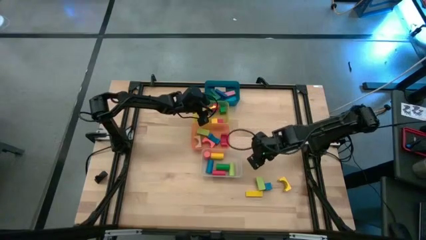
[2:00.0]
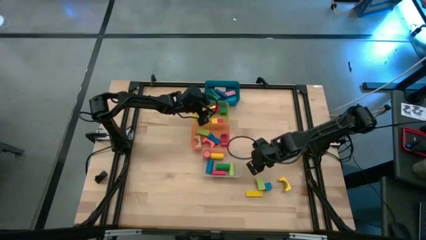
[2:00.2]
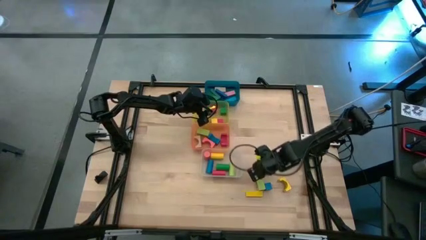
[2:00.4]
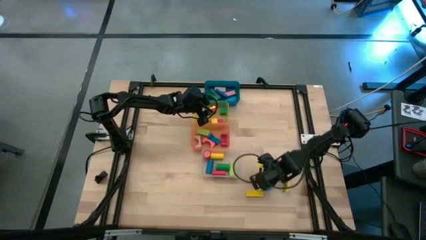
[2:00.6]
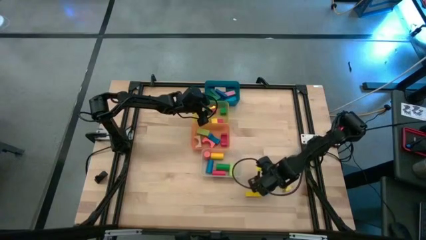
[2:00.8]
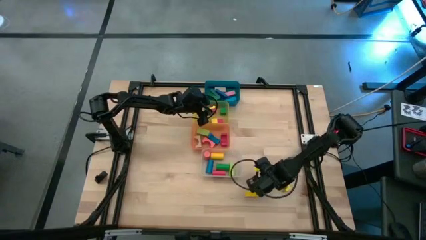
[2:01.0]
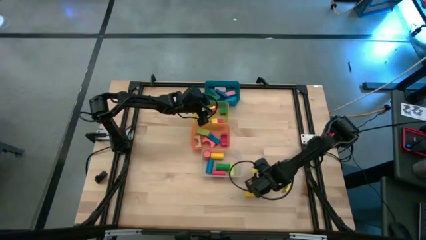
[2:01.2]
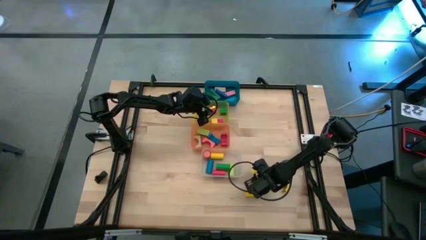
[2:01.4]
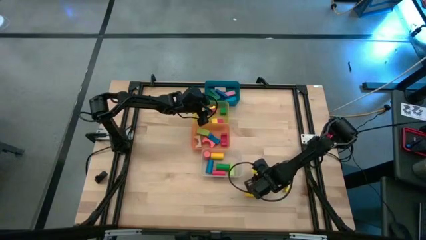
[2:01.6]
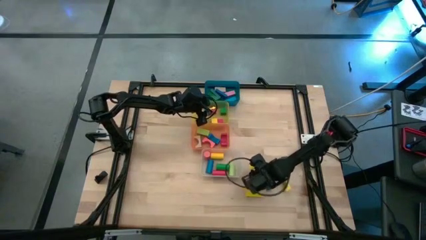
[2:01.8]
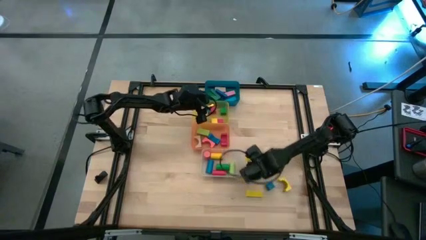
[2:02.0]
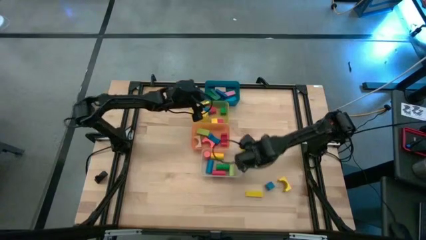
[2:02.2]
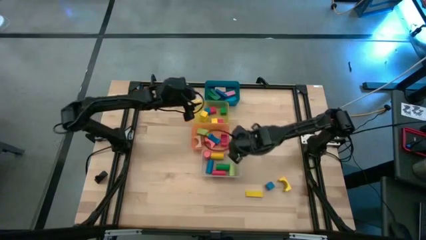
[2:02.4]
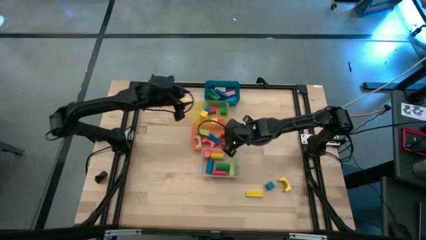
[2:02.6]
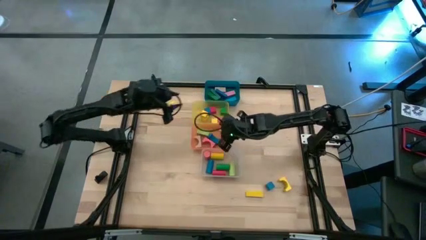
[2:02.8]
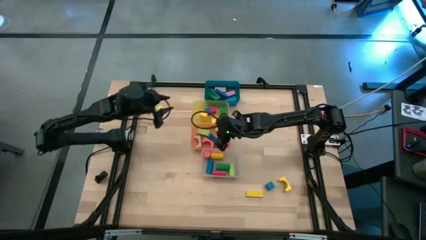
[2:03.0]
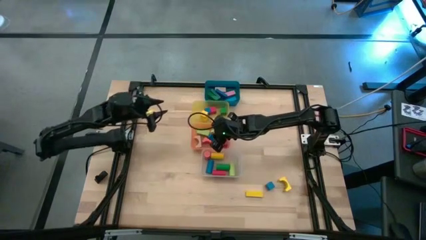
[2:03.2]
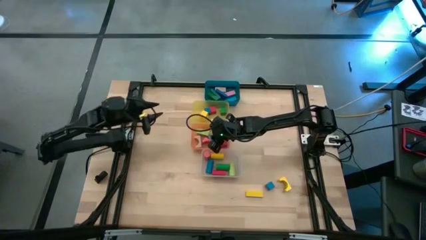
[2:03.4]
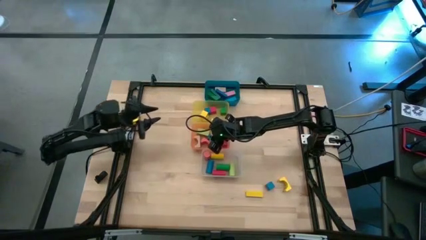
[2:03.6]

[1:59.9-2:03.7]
Task: Sort blocks by size
Put the light green arch block into the orange bin

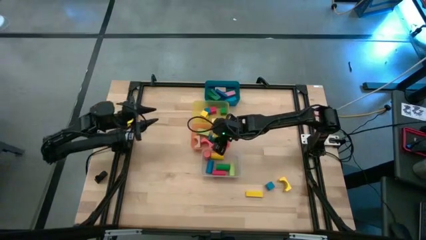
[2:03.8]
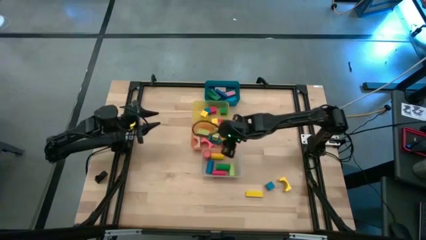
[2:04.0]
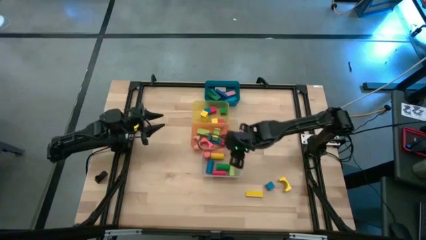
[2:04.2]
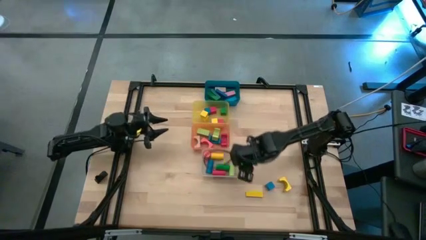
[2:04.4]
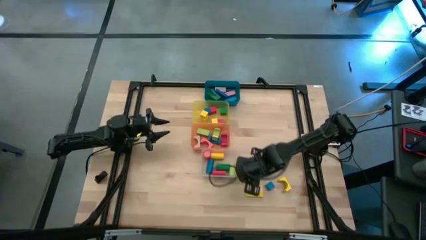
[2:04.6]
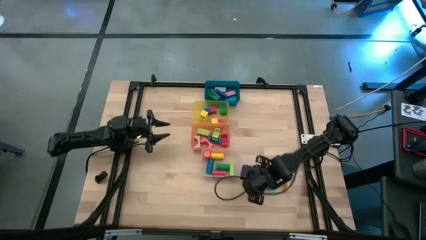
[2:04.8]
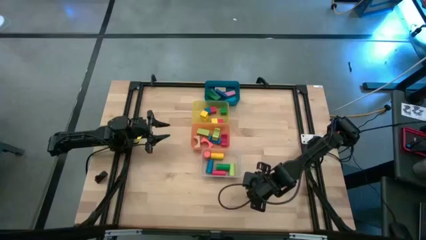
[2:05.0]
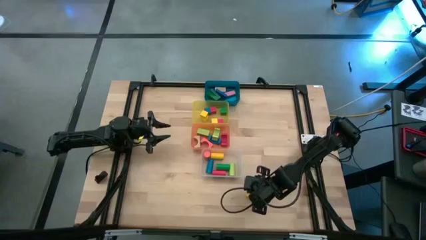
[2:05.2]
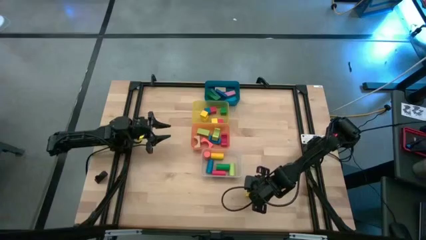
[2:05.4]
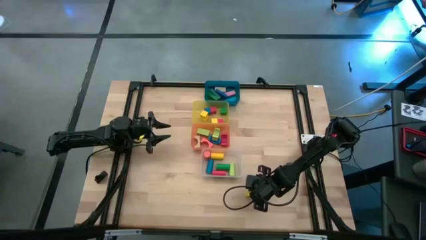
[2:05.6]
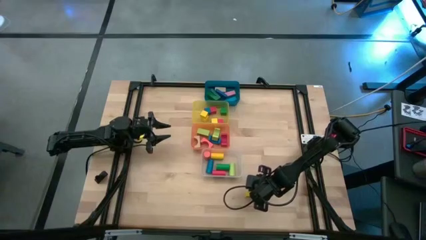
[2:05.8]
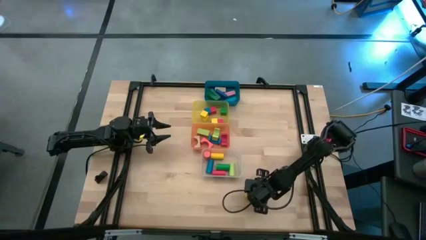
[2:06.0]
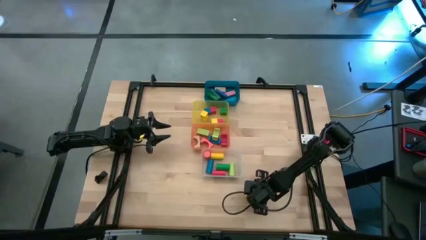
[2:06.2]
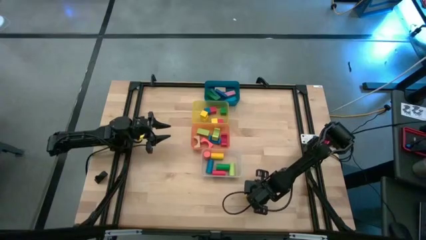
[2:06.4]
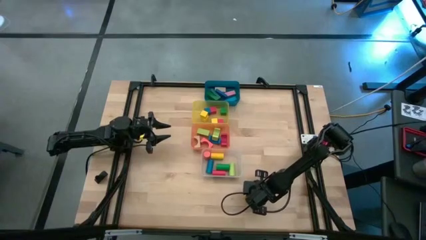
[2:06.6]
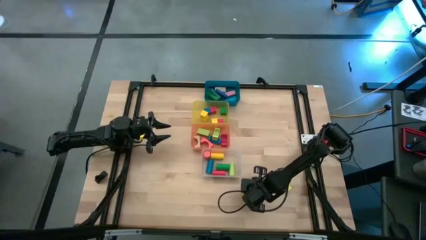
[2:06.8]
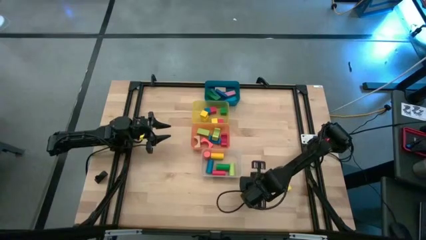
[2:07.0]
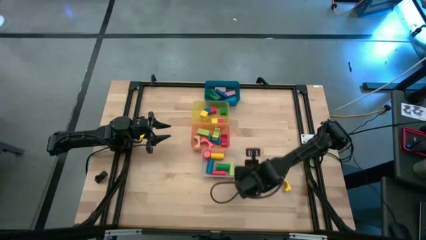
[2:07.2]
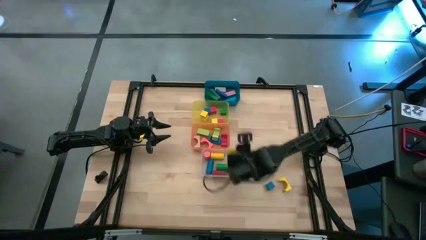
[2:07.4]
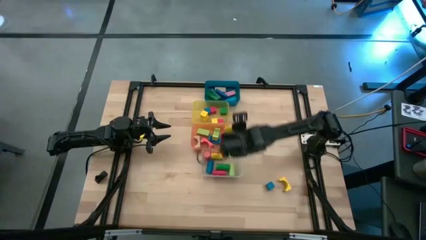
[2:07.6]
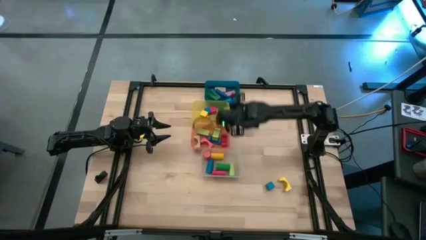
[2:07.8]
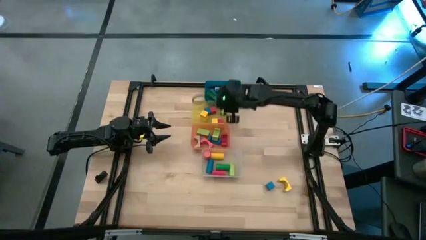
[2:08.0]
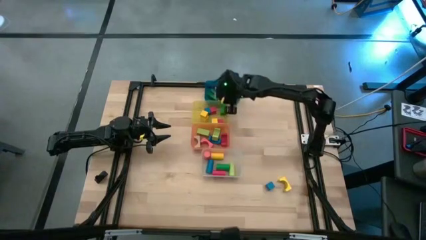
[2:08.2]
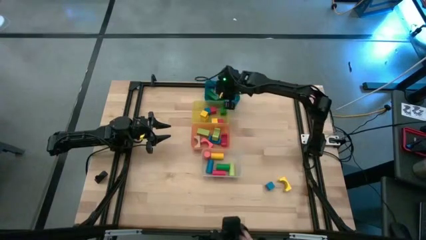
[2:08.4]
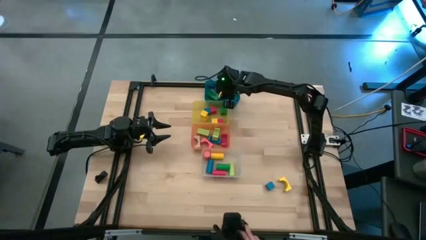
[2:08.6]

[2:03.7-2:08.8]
Put the yellow rectangular block into the blue bin

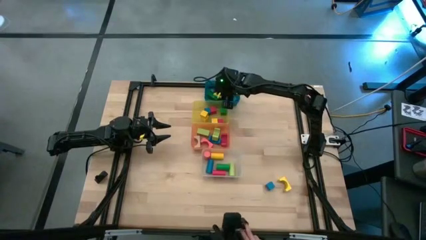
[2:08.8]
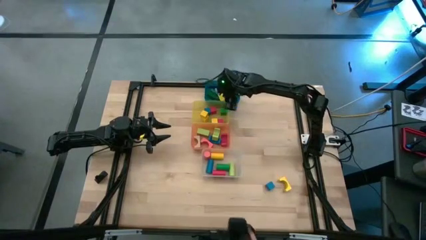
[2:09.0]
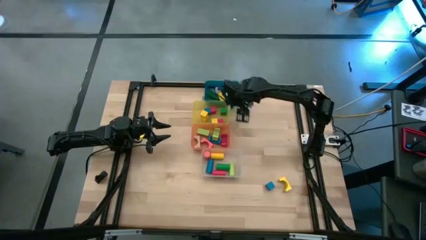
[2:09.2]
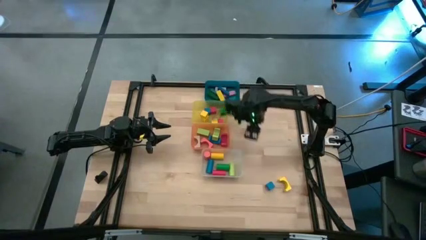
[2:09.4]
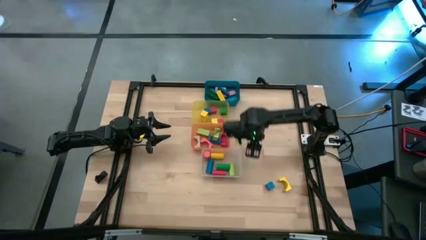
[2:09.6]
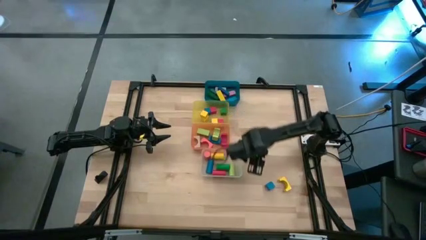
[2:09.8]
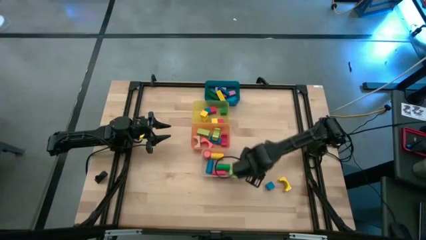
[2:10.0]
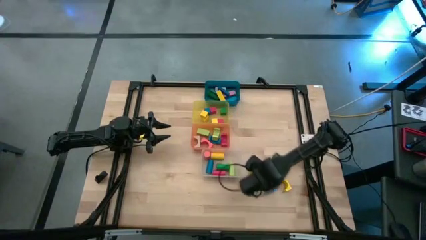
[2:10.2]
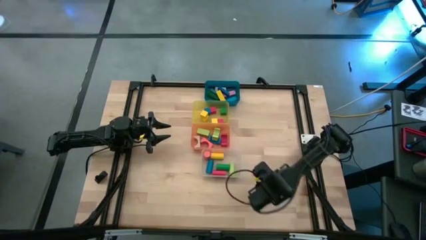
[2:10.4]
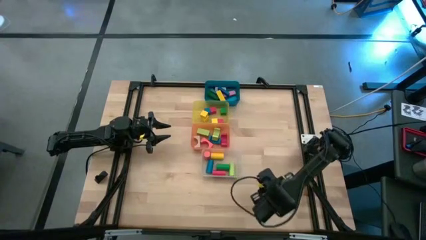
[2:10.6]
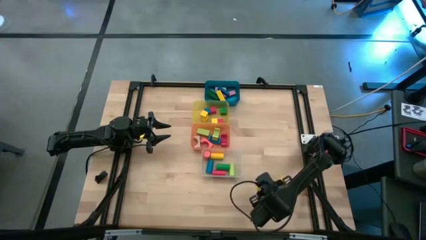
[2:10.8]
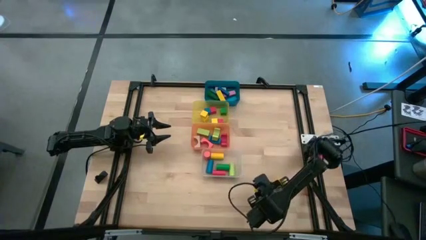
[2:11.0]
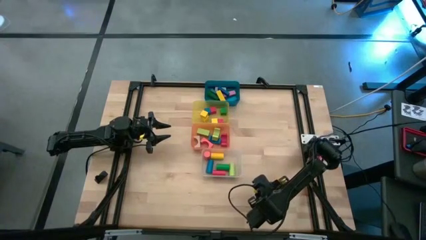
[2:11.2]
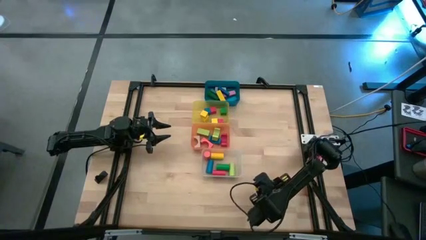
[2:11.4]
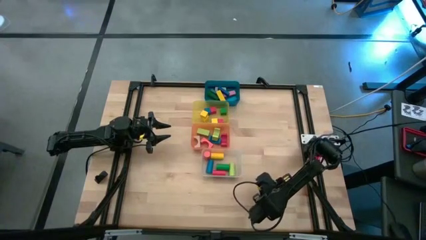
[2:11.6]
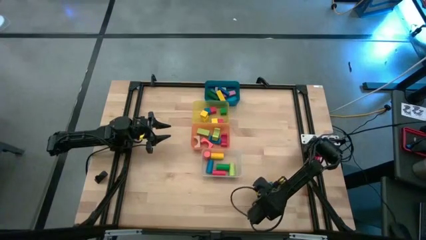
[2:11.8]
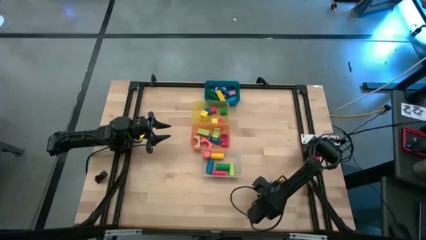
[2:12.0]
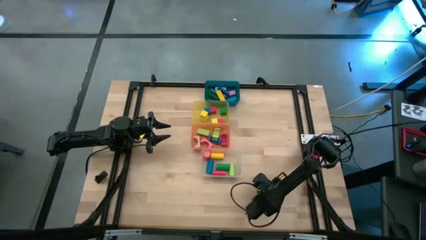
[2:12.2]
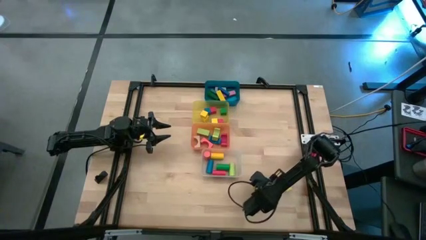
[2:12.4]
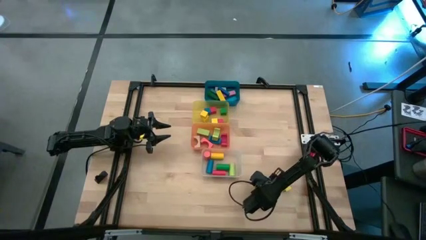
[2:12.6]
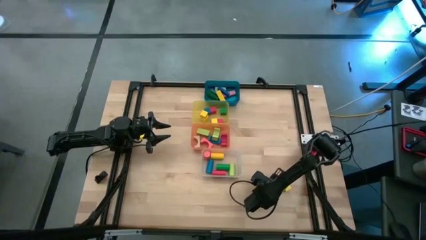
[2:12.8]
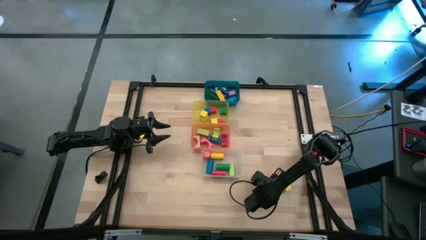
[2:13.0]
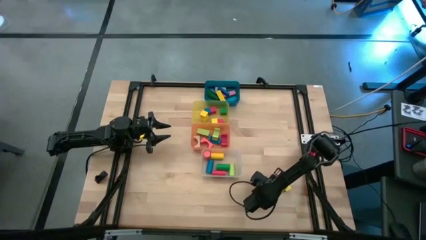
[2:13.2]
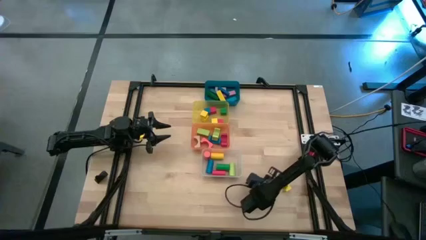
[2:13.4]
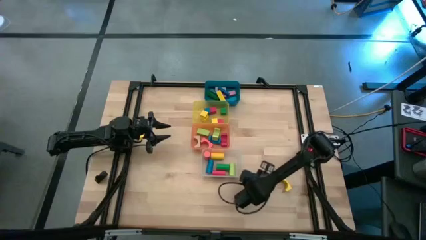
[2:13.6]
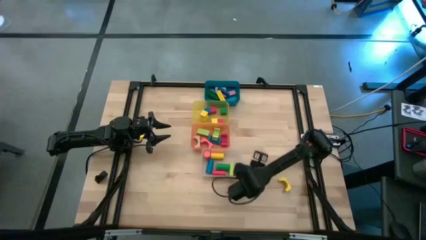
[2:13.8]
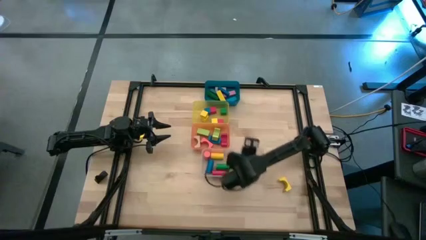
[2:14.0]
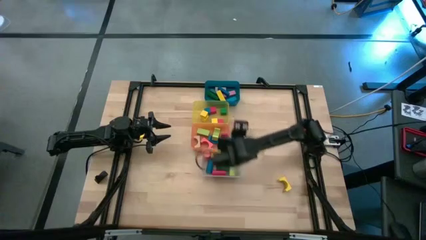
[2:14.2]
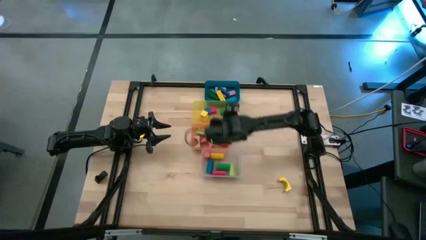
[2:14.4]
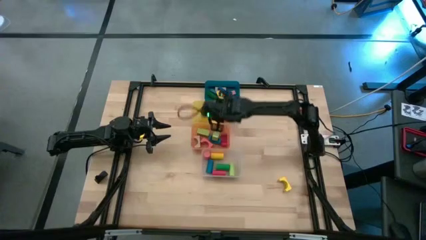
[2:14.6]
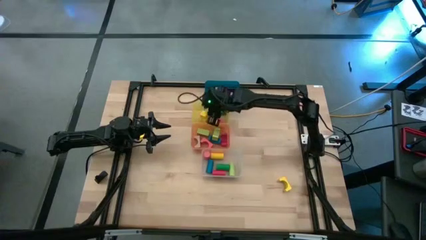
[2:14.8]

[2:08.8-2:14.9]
Put the blue square block into the yellow bin

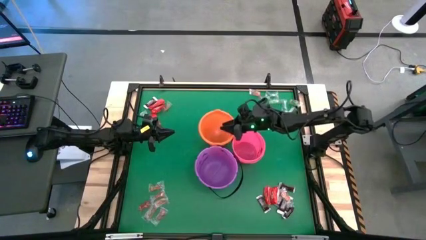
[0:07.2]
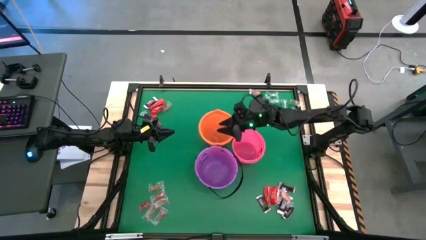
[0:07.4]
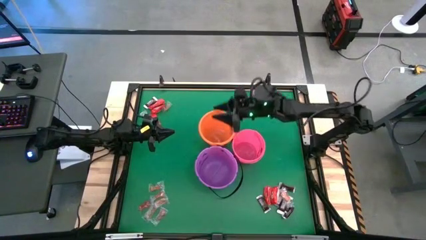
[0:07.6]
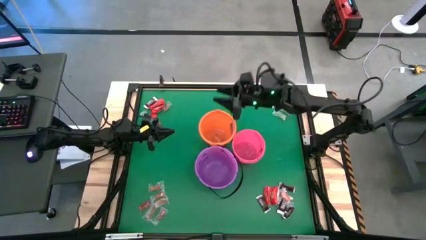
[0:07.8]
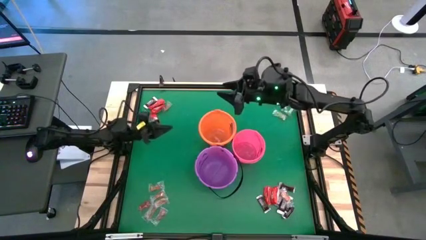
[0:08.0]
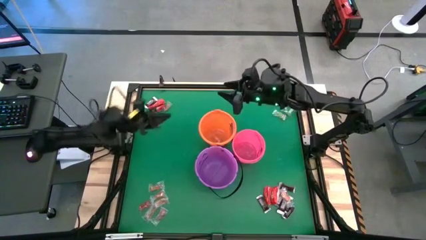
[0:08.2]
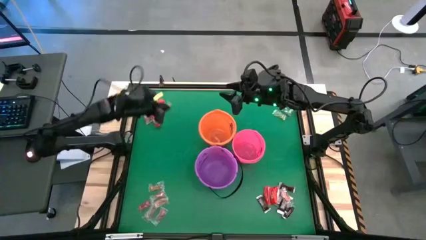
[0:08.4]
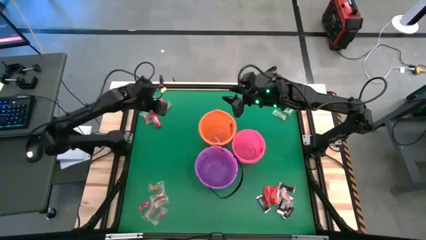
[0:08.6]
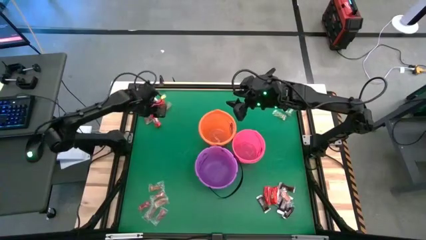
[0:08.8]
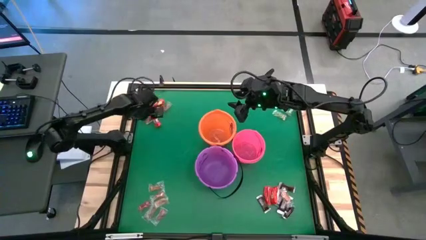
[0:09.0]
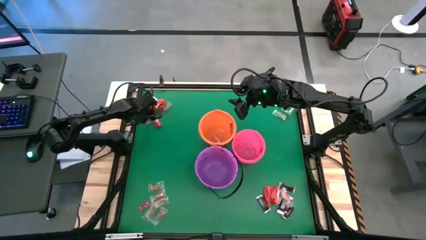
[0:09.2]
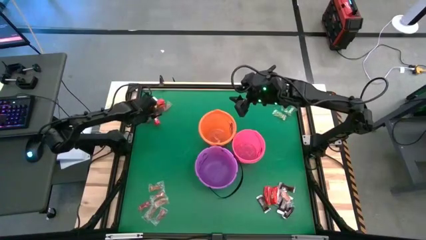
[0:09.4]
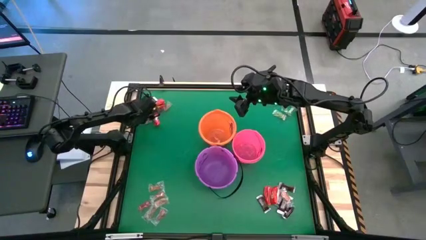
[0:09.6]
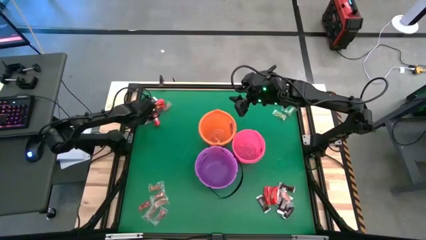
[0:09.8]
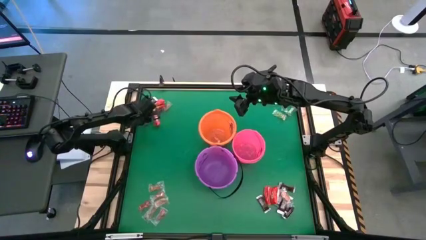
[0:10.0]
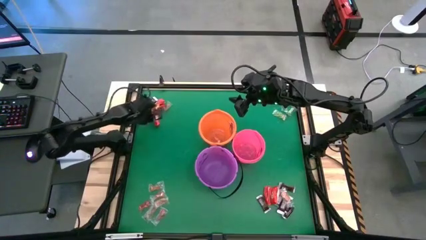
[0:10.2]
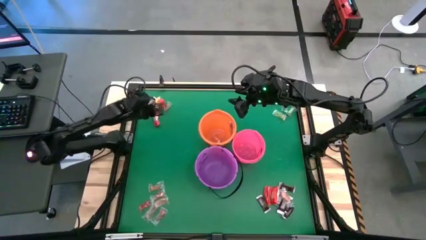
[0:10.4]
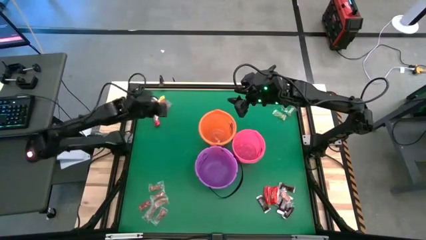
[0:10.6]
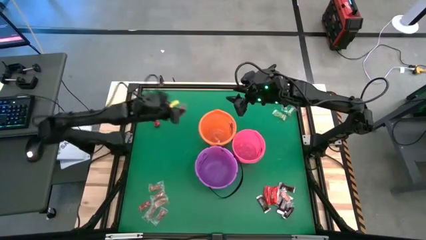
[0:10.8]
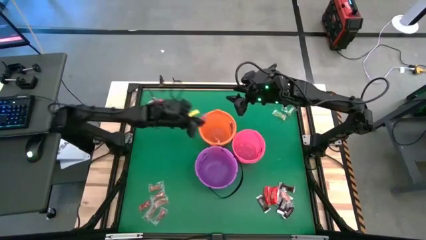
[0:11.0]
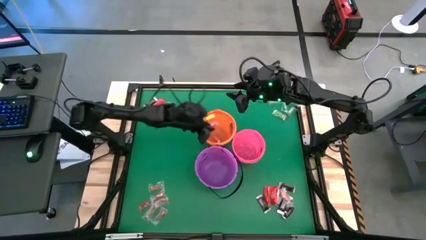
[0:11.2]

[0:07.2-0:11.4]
Task: Sort candy by brand, put in halloween buckets
Put the red gummy into the orange bucket
